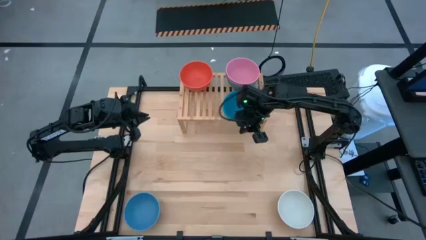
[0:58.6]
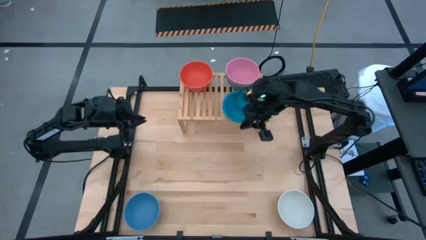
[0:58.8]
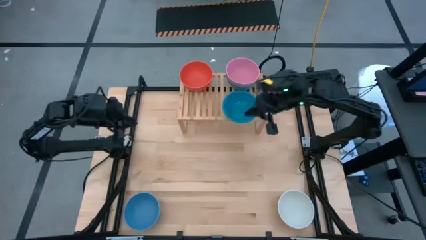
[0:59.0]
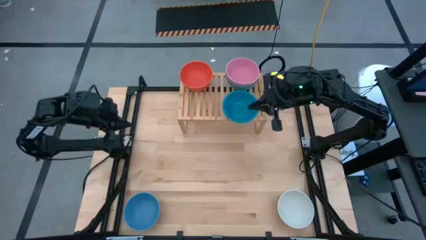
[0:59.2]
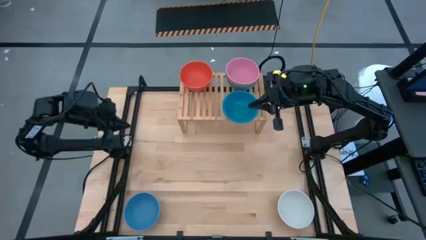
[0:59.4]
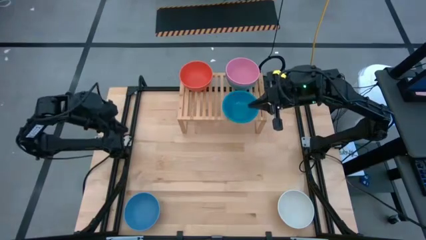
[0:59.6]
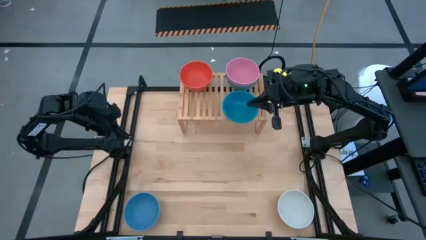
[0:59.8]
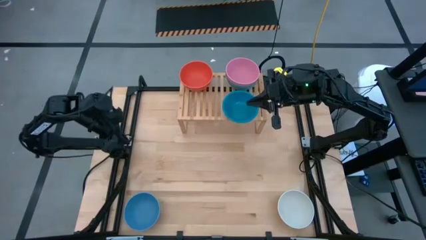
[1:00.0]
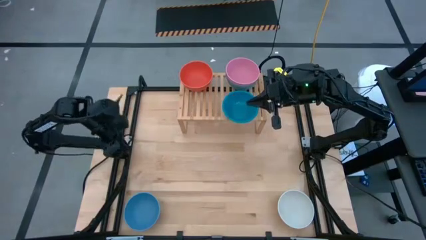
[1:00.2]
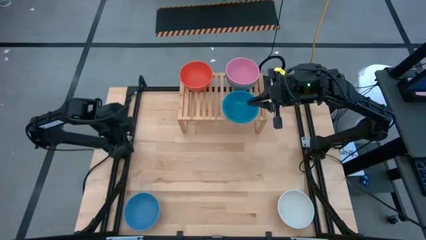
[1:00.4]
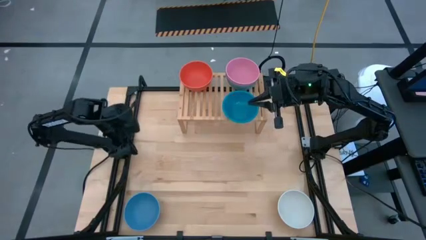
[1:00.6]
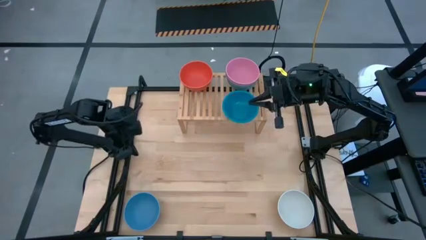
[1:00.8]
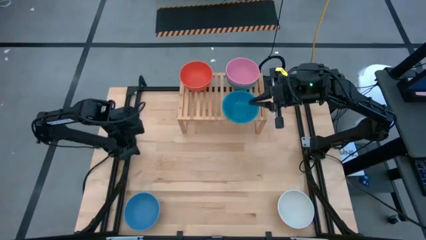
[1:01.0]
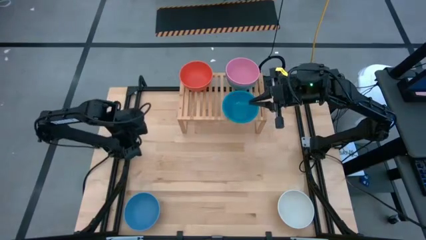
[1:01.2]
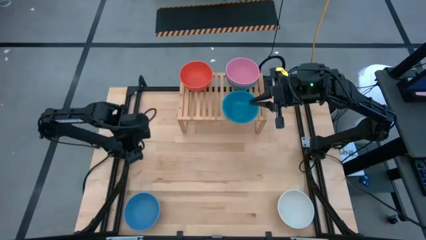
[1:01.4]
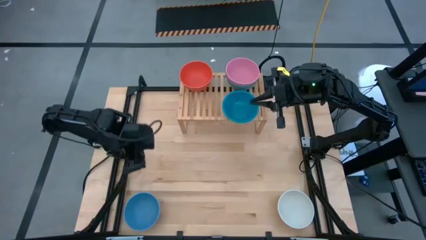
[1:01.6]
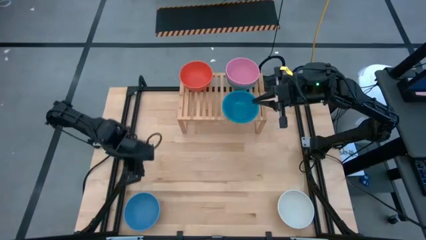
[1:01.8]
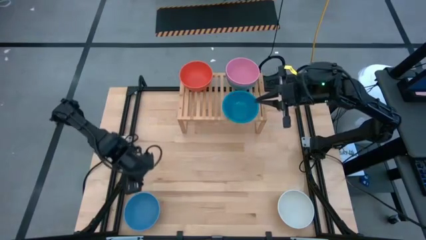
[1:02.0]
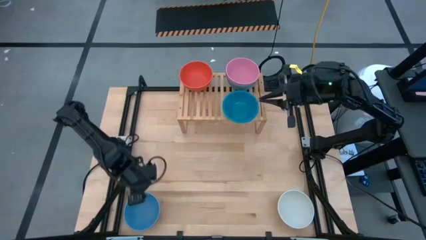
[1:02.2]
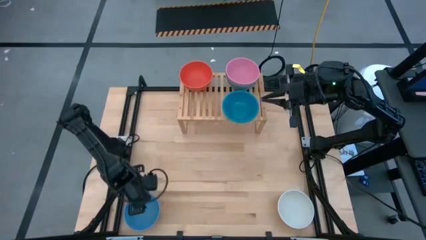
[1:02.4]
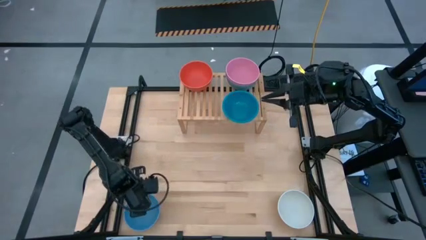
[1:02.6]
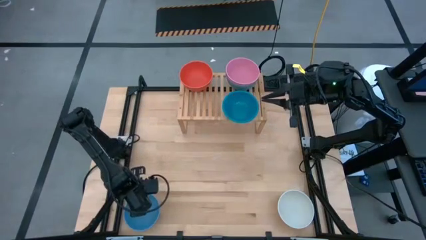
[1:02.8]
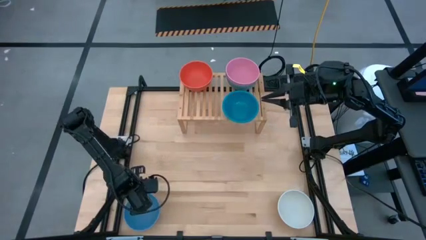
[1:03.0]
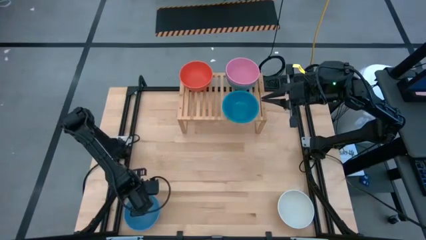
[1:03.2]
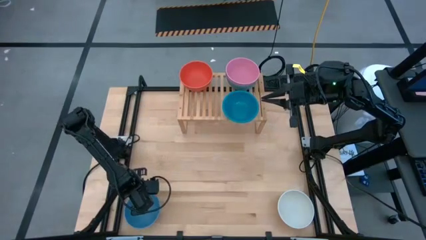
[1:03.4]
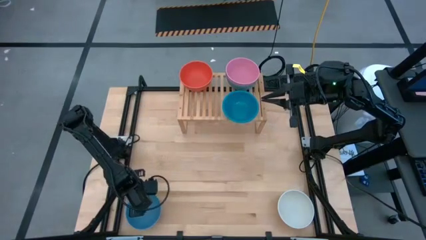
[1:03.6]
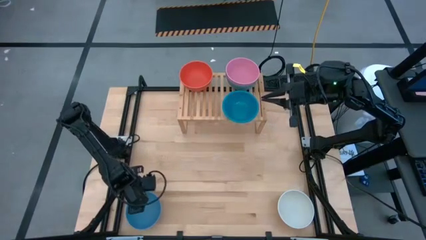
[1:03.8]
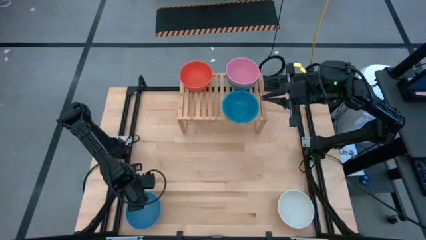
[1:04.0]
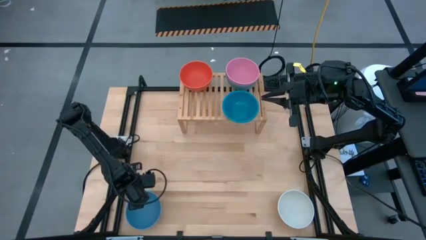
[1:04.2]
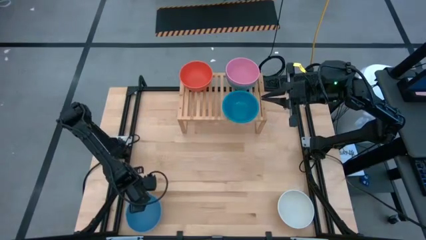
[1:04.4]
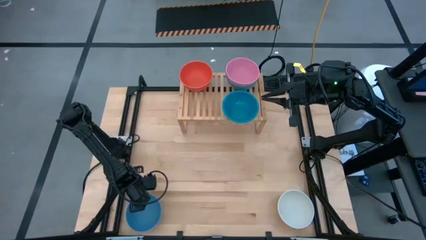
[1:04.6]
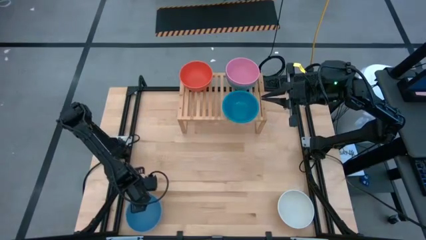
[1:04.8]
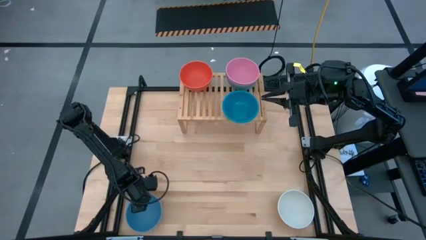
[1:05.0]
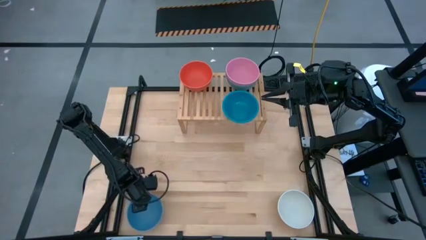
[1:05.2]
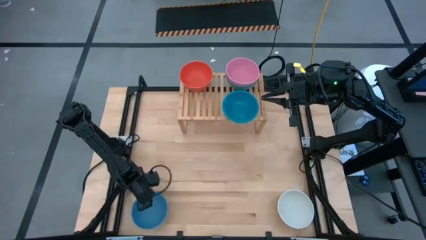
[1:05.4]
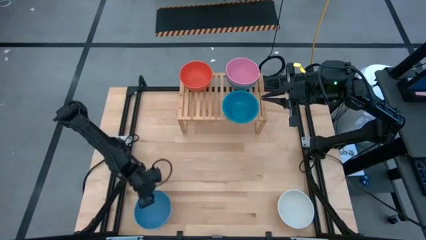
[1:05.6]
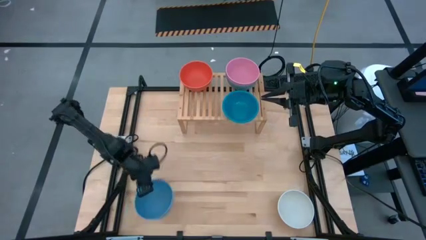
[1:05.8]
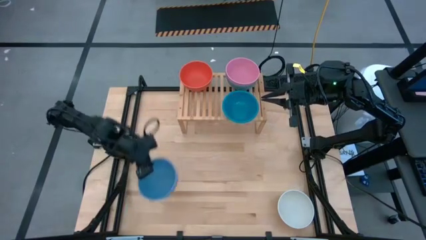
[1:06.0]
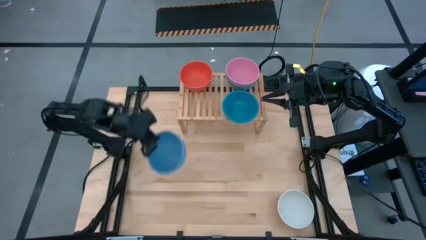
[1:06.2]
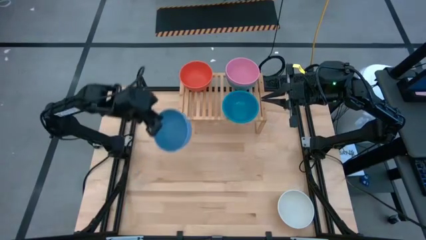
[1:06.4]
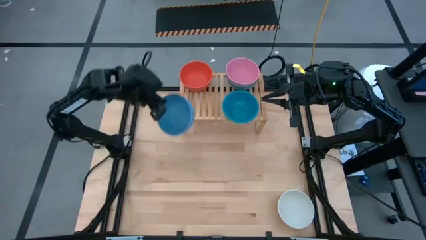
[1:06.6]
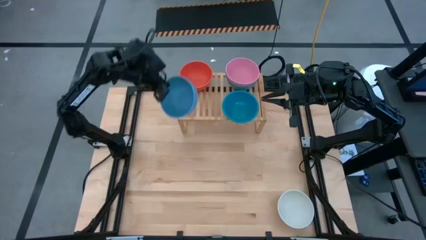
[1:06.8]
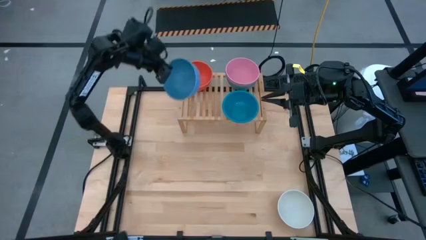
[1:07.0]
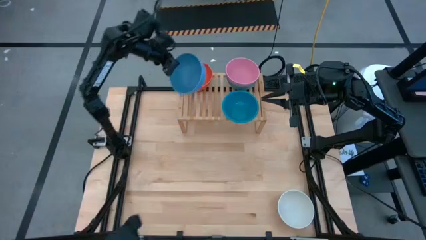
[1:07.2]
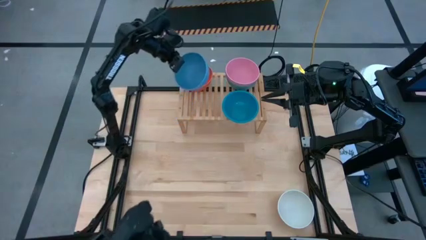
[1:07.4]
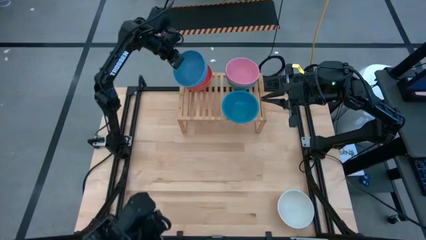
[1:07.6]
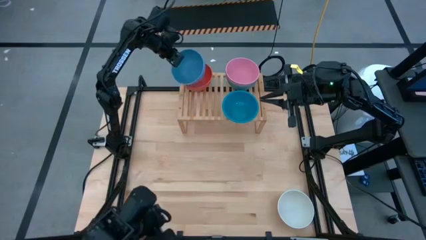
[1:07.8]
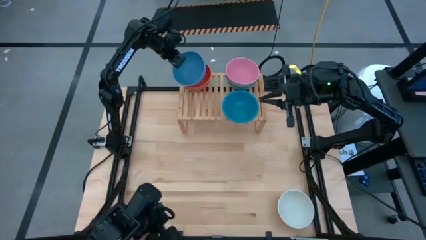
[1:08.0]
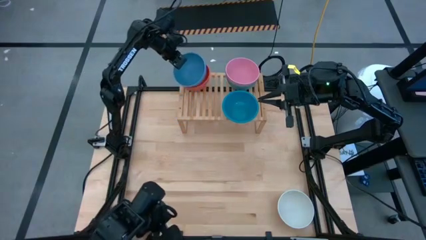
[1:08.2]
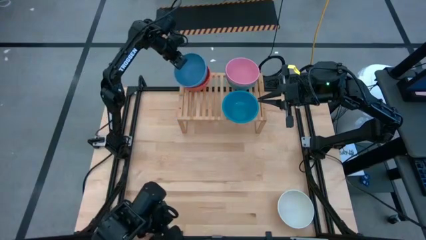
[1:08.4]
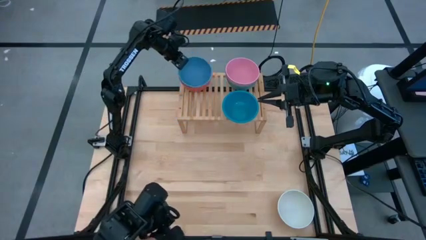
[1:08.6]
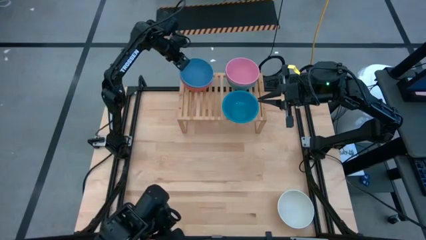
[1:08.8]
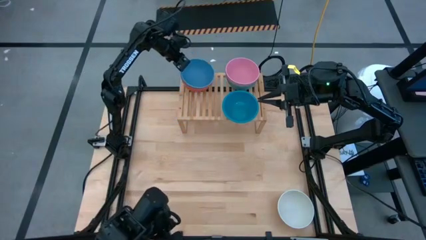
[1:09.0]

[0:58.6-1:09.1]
Task: Place and stack bowls onto a shelf
Stack the light blue bowl on the orange bowl on the shelf
